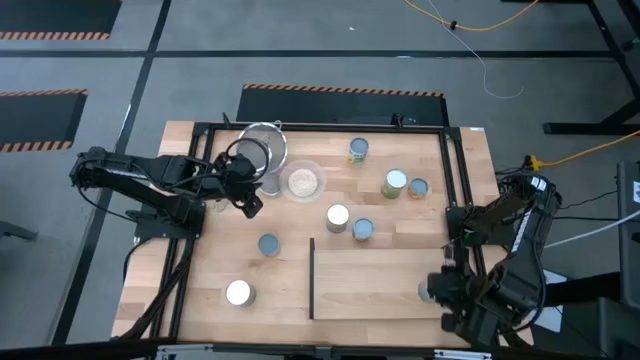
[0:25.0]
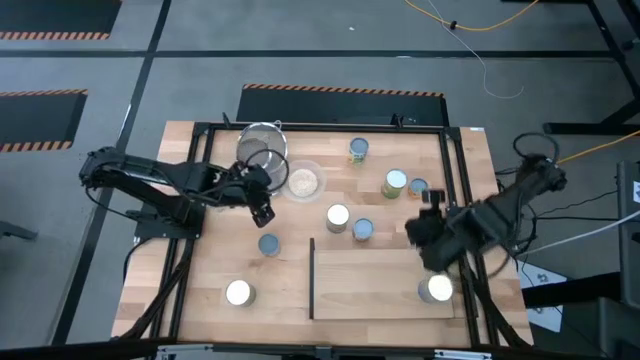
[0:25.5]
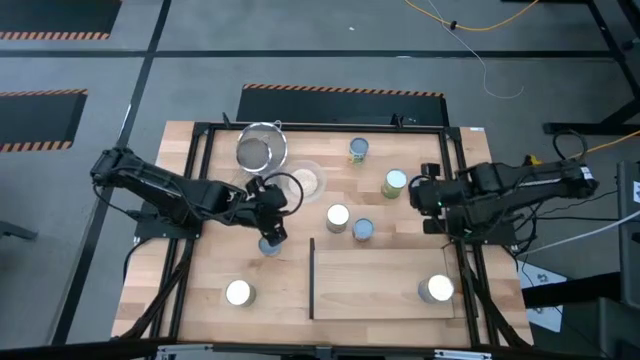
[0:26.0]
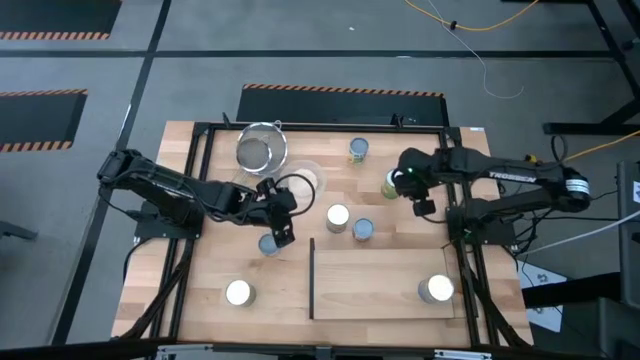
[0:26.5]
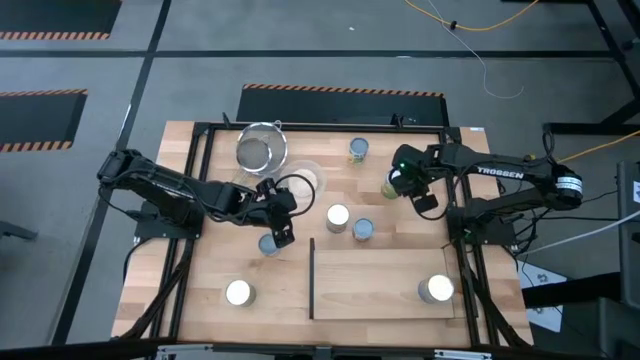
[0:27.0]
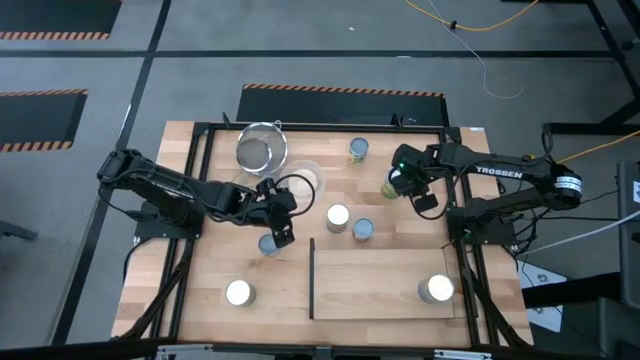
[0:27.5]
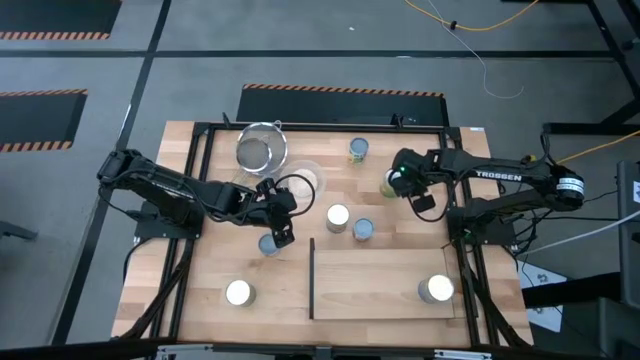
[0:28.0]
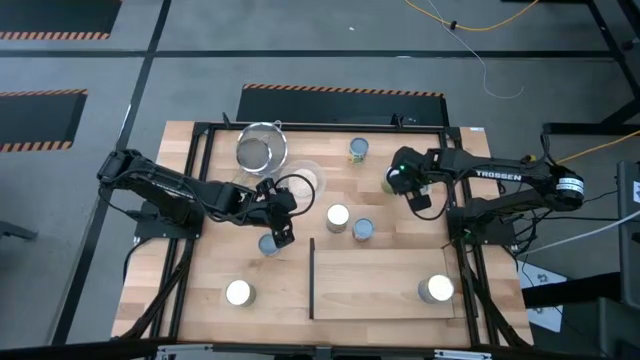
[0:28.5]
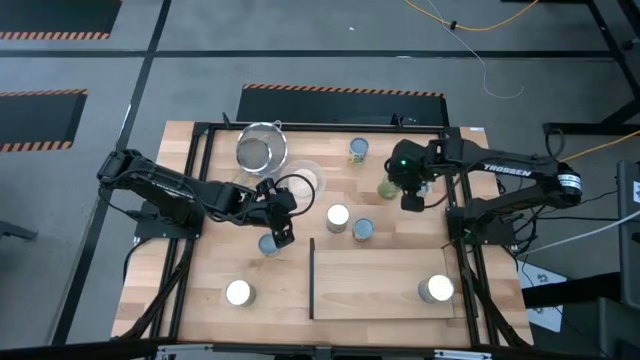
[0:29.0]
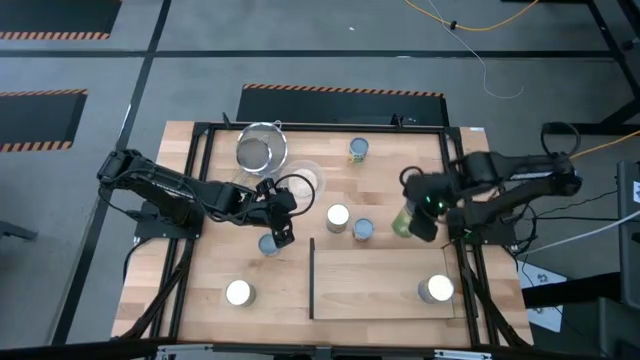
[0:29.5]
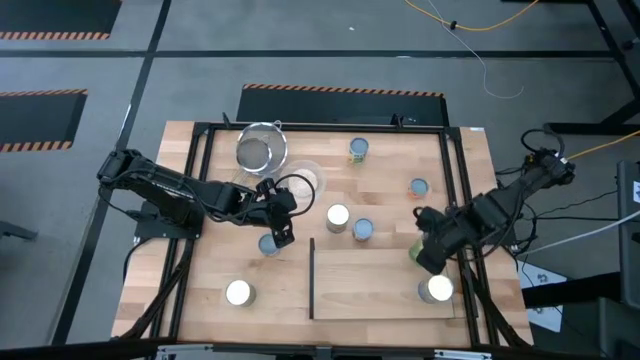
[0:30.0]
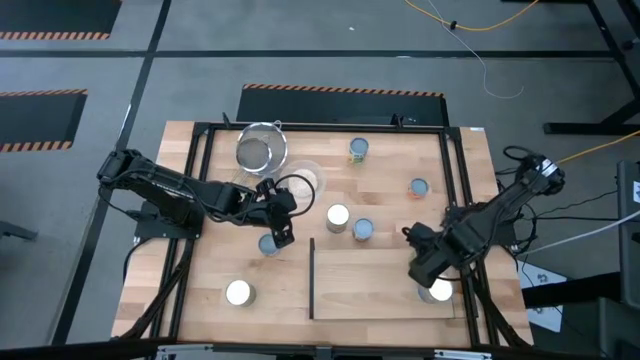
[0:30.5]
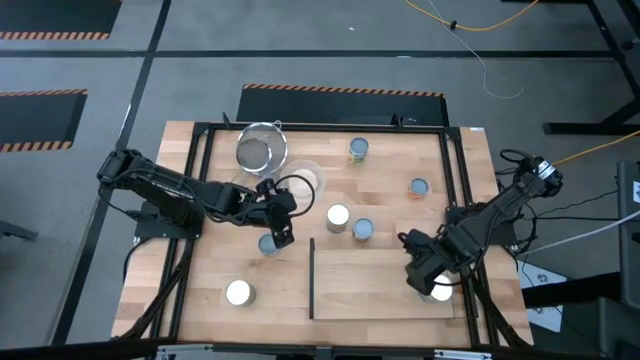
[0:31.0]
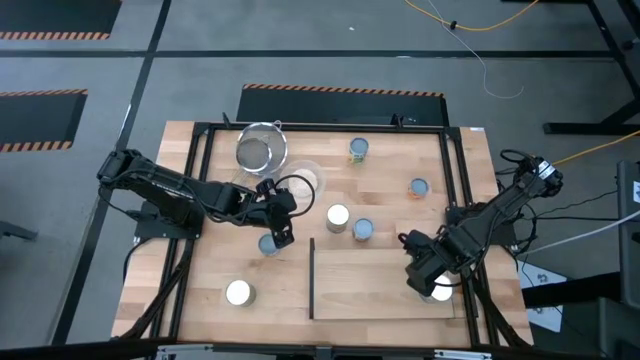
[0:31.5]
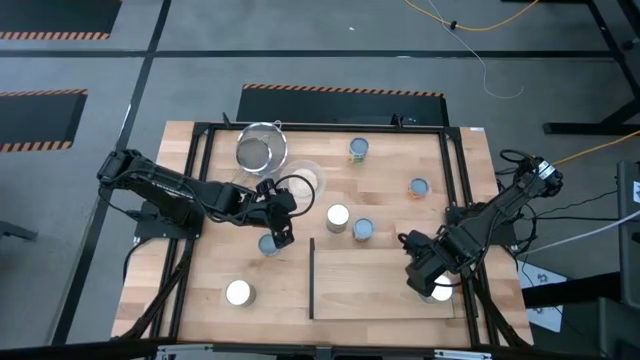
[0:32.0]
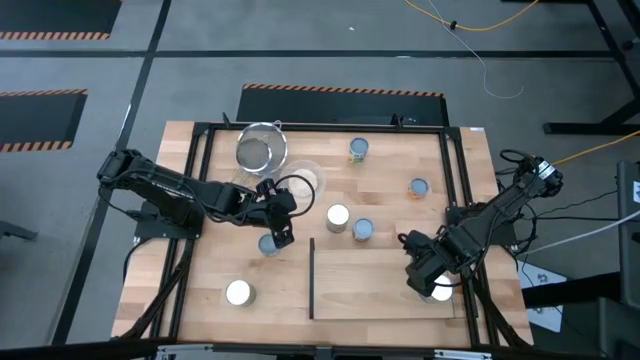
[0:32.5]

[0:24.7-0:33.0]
Task: Pick and place cans onto a shelf
Put the green can on the shelf aligned with the other blue can

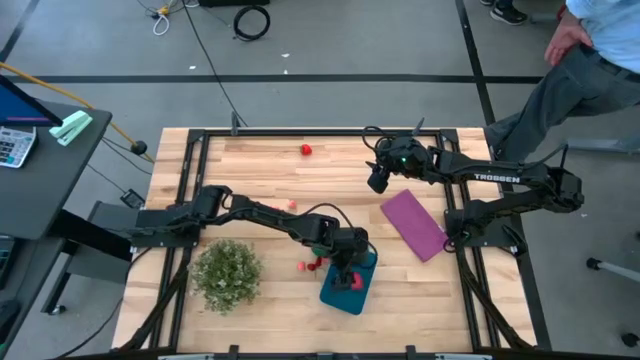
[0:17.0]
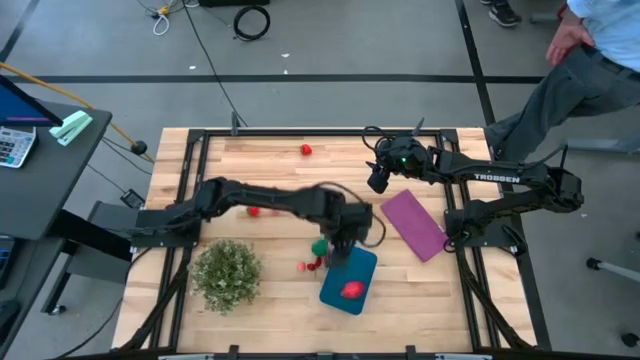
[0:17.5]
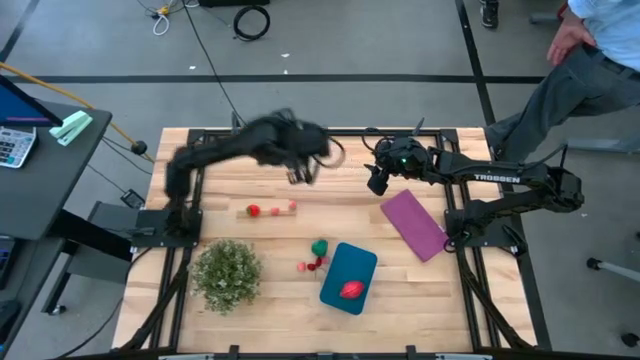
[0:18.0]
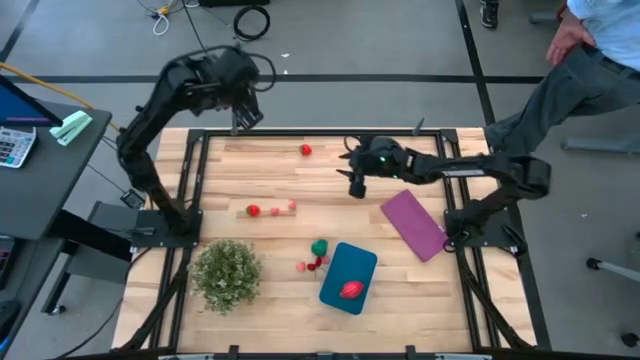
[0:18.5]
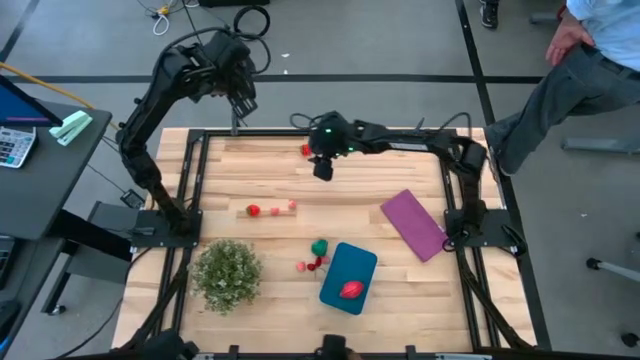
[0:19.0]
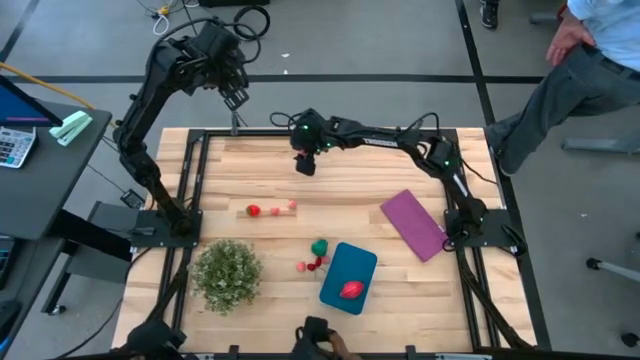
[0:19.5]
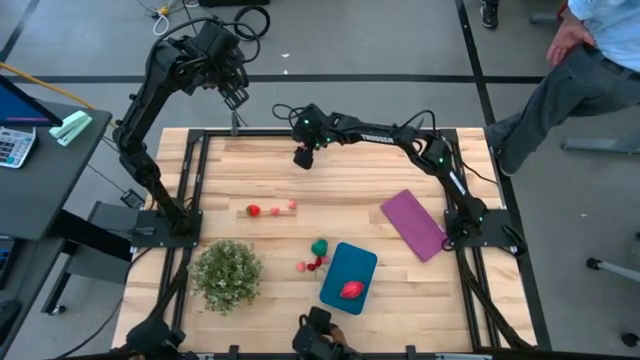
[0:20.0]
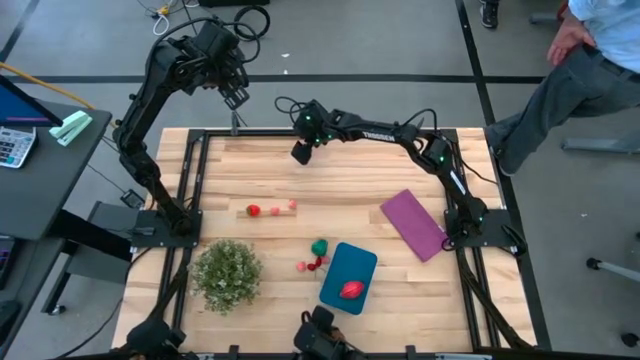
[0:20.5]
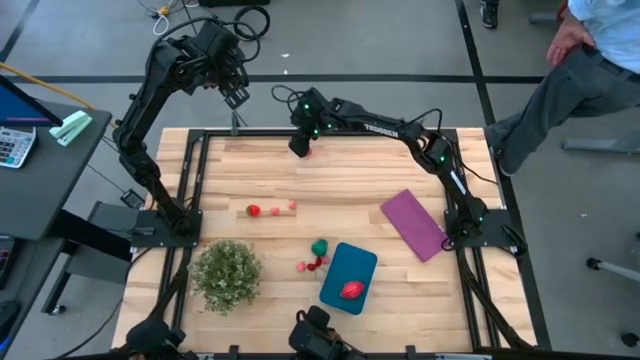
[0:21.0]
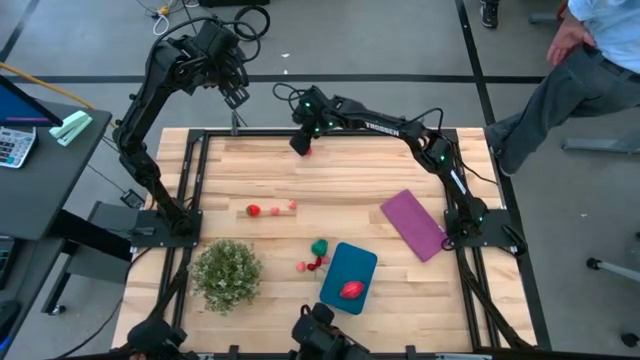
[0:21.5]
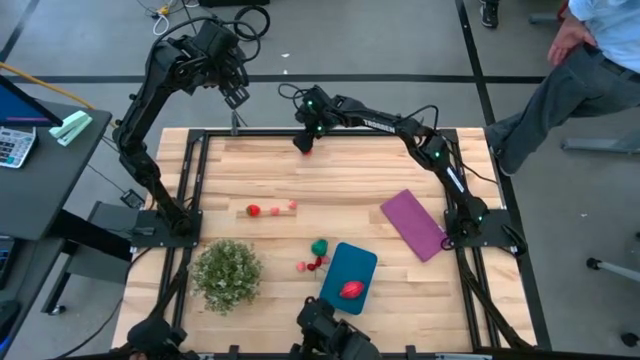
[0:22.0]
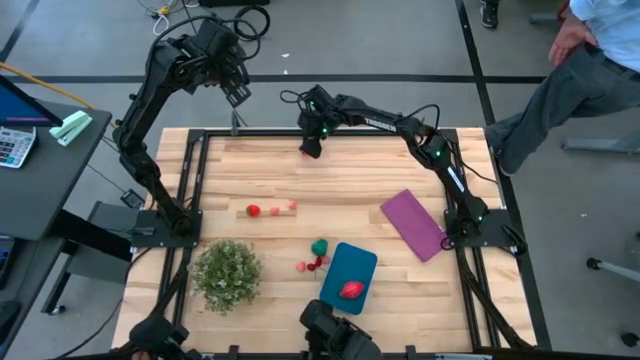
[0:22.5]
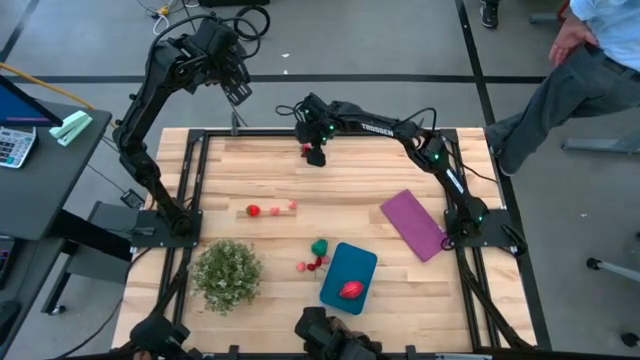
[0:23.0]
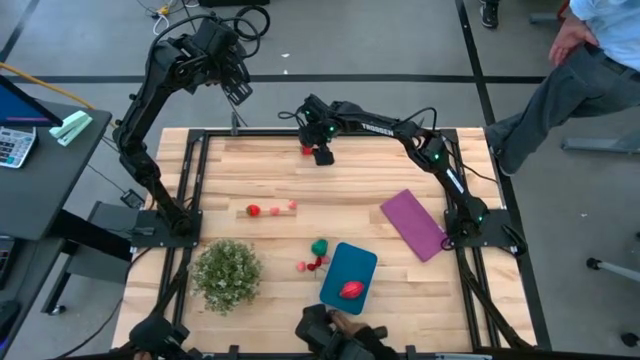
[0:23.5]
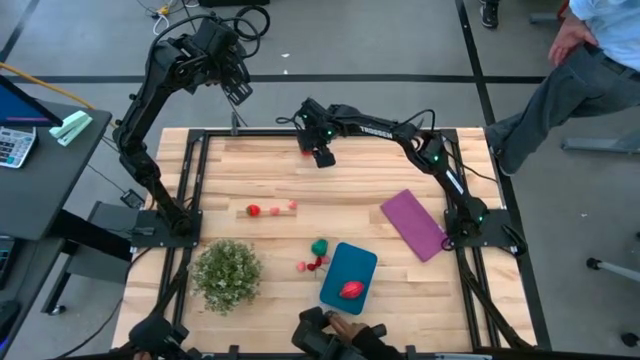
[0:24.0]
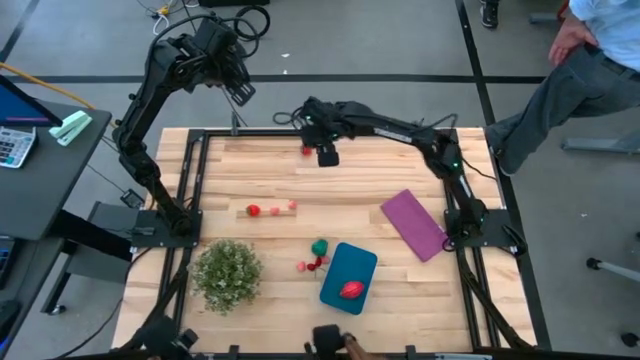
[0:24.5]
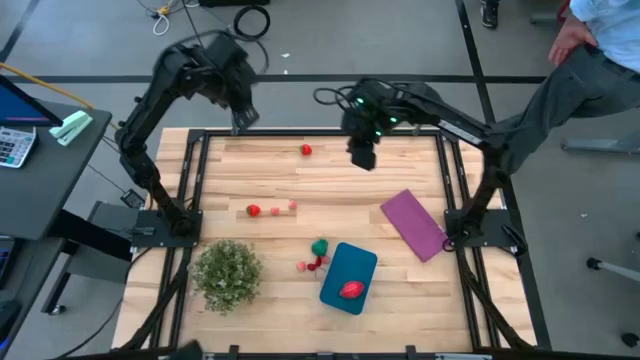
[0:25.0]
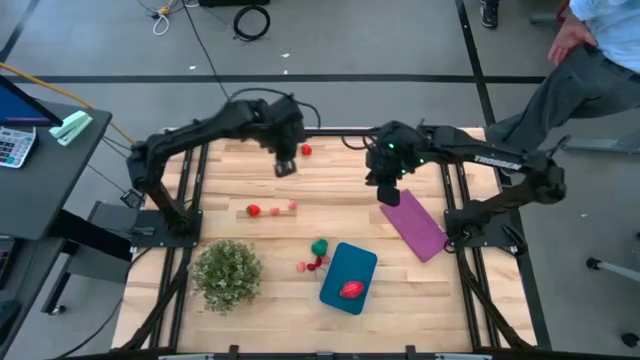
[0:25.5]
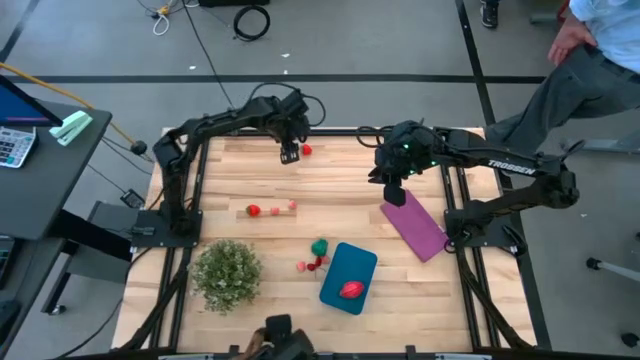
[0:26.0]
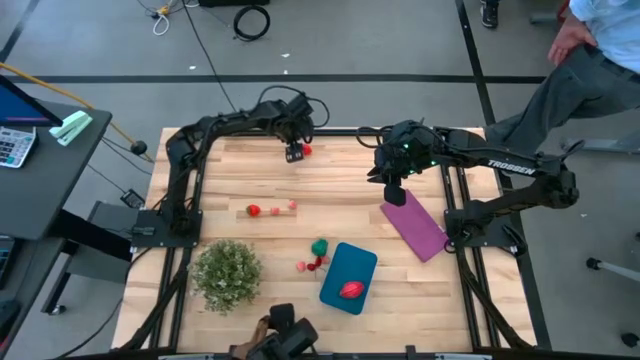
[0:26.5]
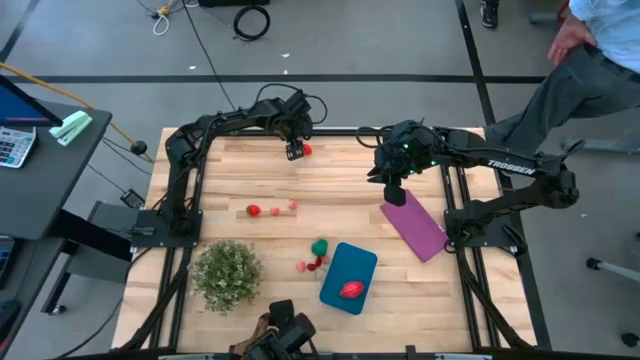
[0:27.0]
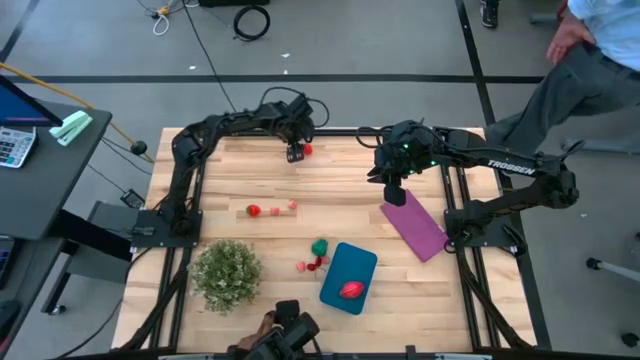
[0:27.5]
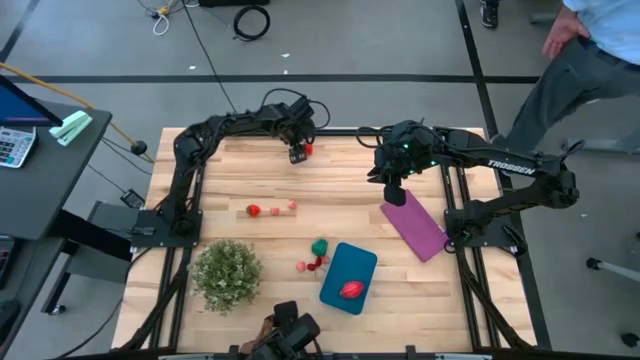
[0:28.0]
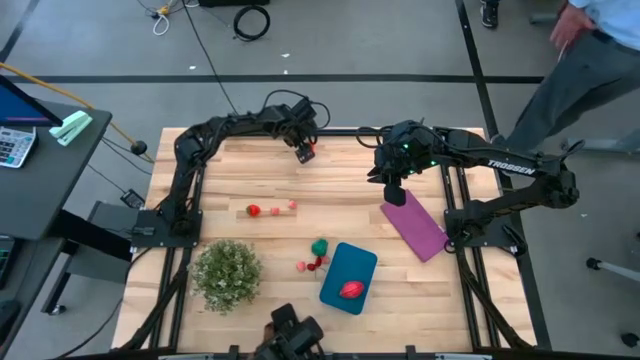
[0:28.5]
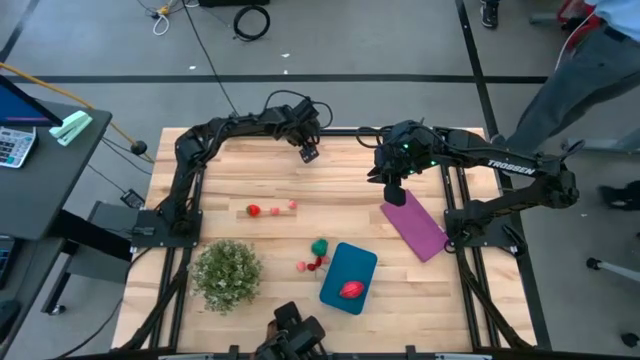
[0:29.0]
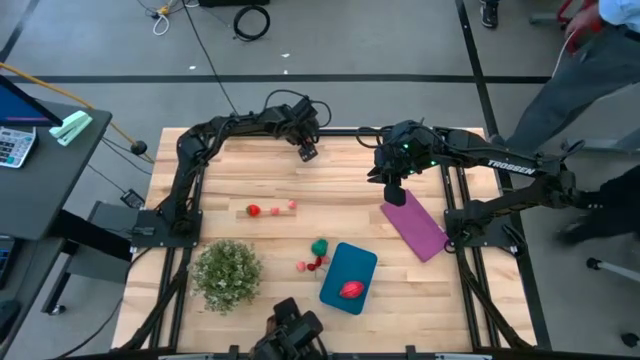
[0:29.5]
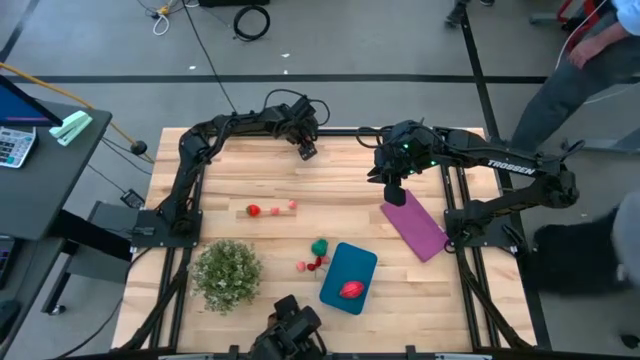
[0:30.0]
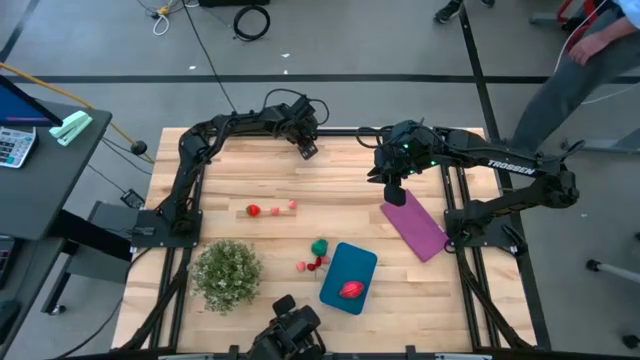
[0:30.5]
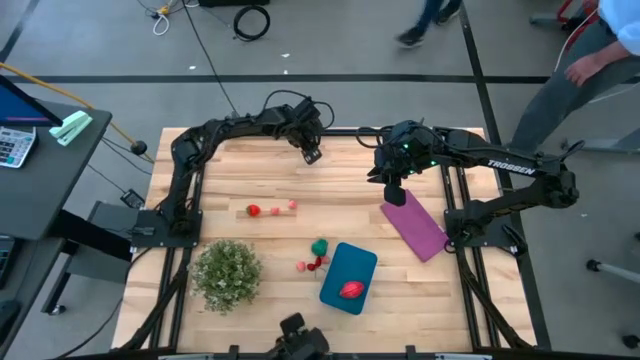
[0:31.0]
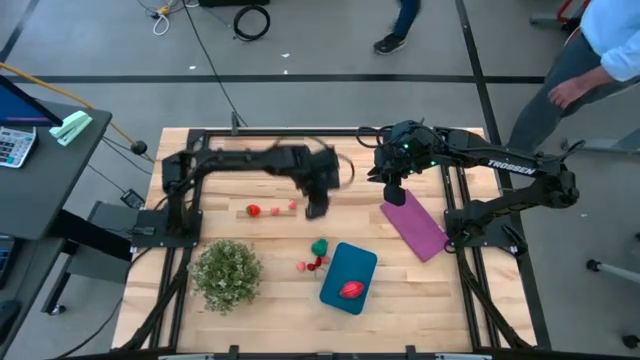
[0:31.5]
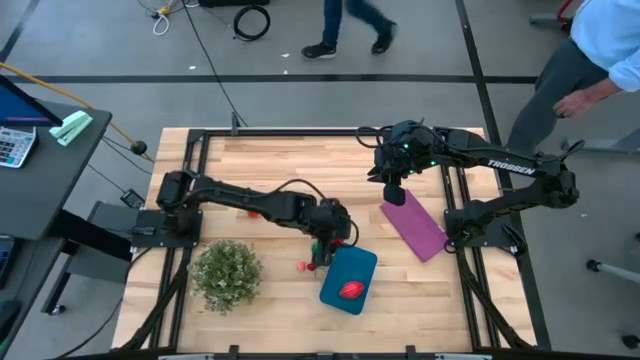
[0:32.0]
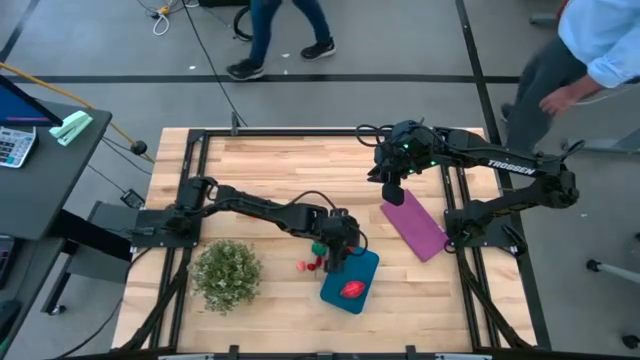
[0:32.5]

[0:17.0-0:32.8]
Task: Pick and placing Produce into tupperware
Put the top red strawberry into the blue bin
